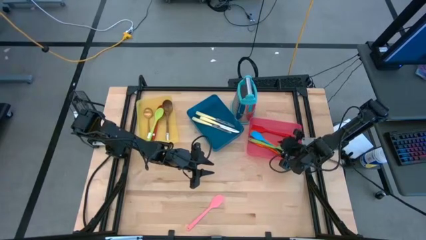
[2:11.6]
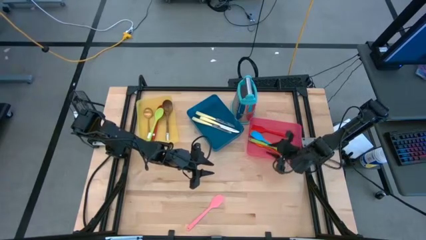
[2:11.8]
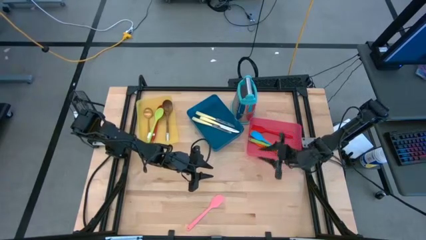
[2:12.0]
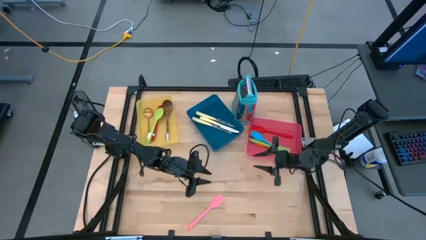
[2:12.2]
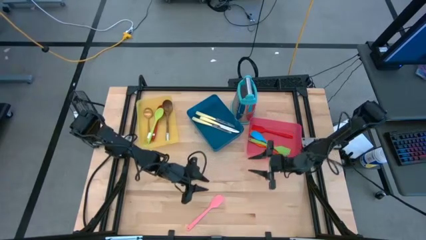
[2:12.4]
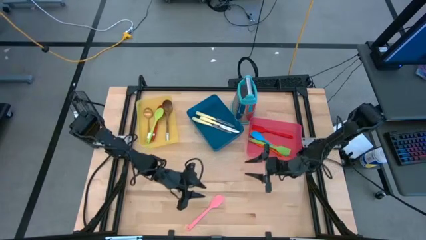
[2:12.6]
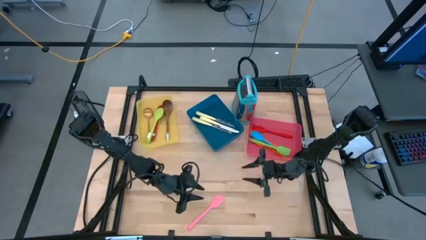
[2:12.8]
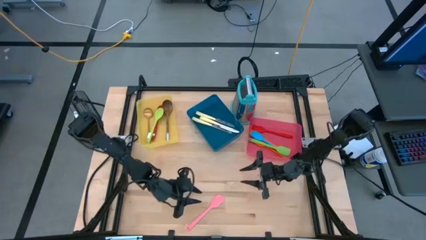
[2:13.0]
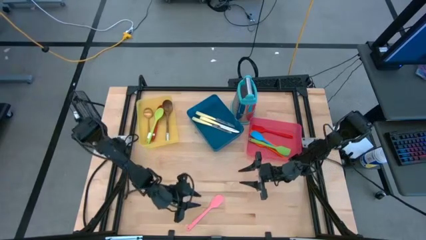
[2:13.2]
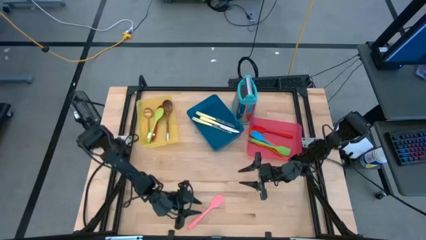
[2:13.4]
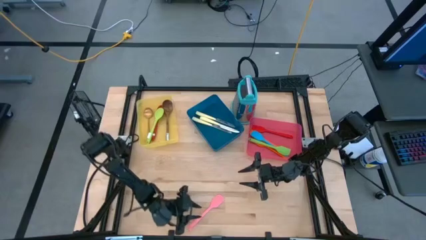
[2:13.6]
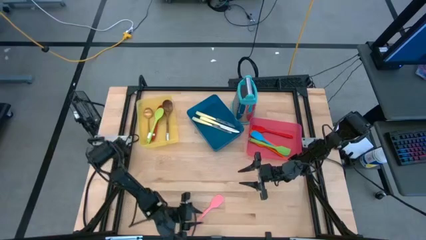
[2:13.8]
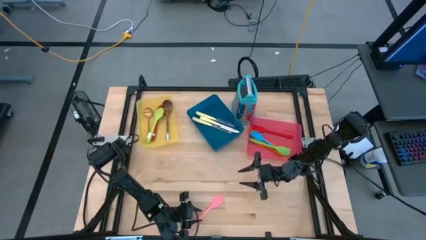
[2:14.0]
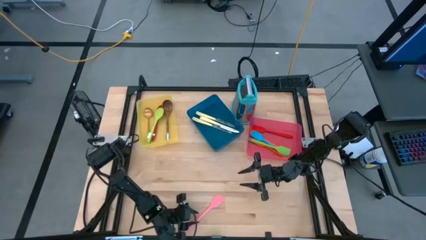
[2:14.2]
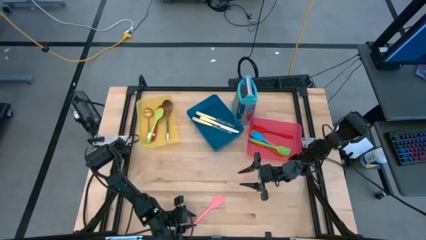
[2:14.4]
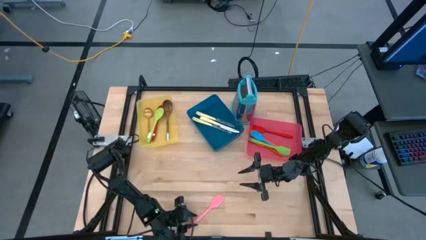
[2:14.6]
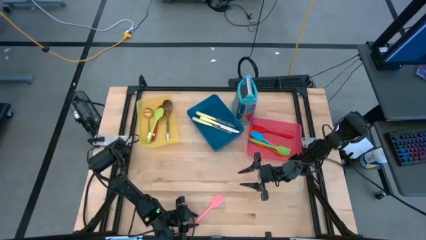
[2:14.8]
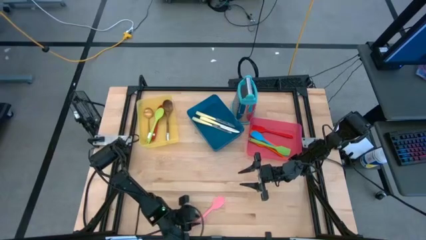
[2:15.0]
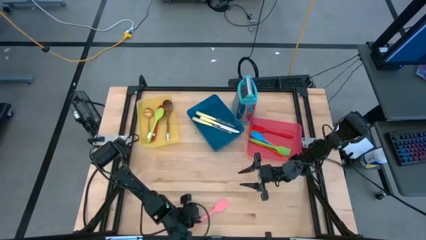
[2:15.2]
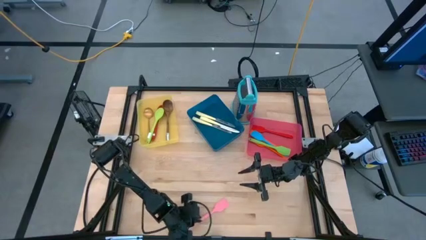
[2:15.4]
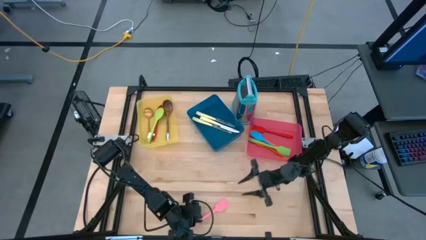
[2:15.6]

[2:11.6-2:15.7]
Task: Pick & Place Kitchen Items
Put the pink spatula into the pink bin

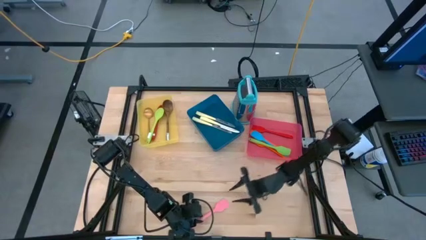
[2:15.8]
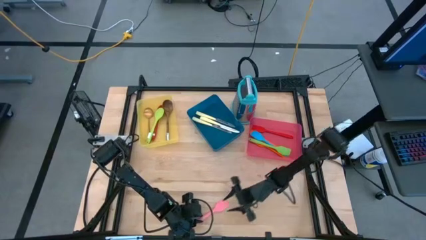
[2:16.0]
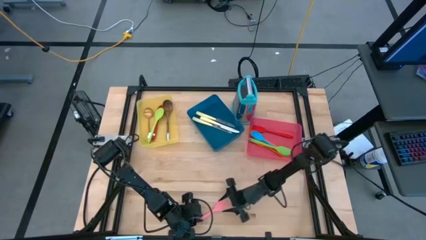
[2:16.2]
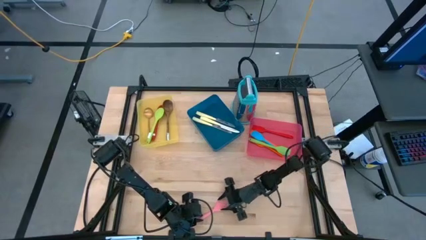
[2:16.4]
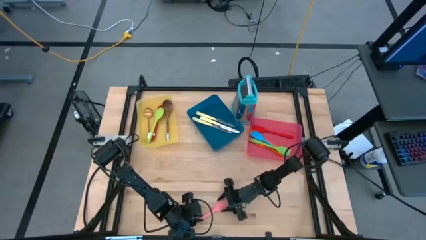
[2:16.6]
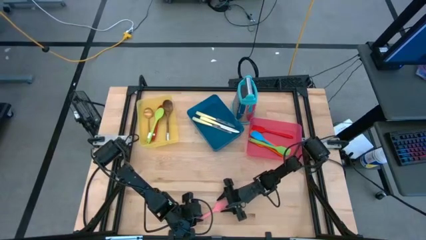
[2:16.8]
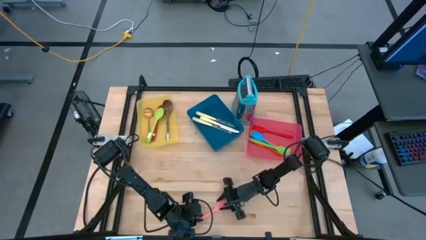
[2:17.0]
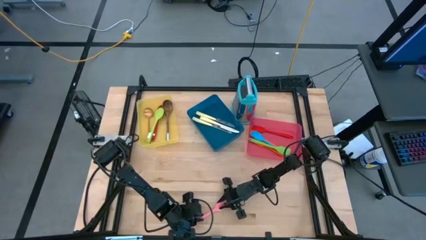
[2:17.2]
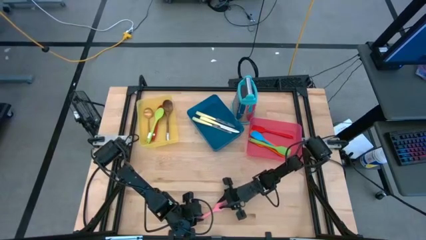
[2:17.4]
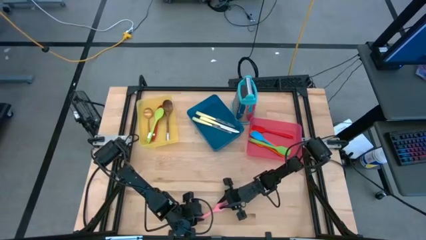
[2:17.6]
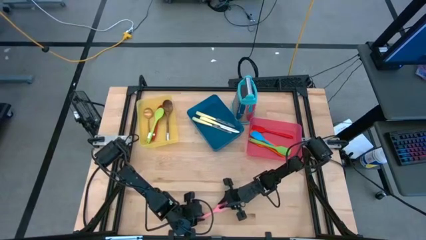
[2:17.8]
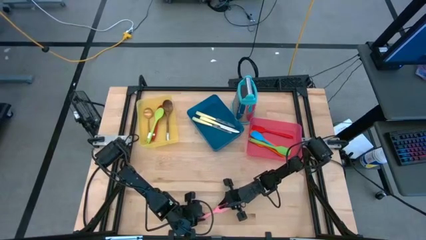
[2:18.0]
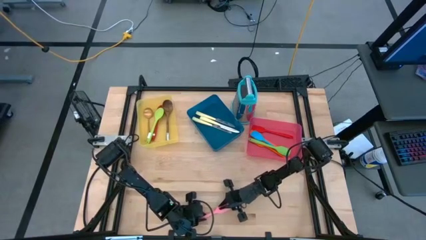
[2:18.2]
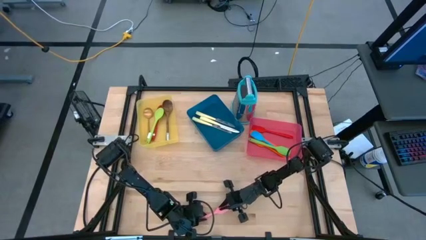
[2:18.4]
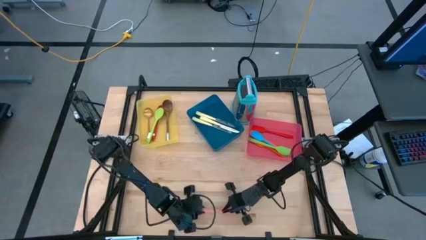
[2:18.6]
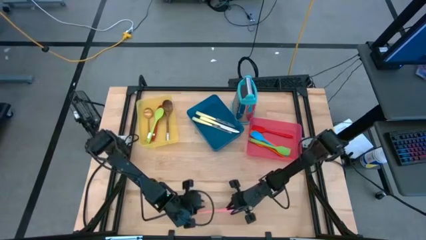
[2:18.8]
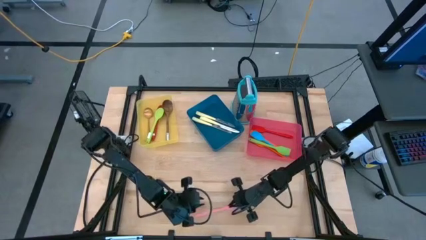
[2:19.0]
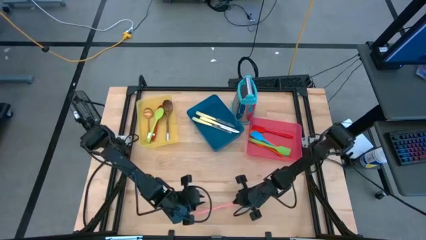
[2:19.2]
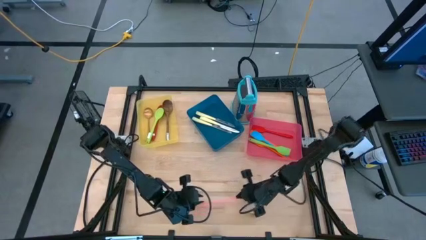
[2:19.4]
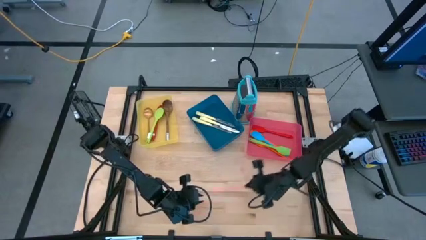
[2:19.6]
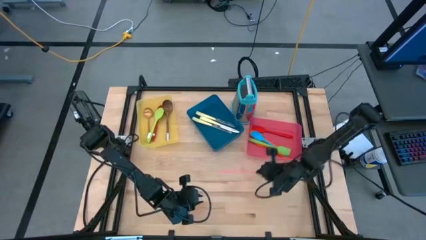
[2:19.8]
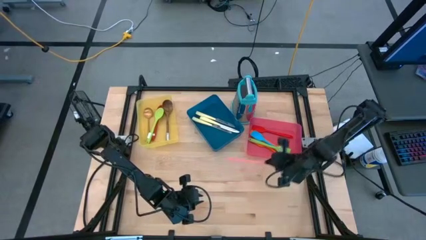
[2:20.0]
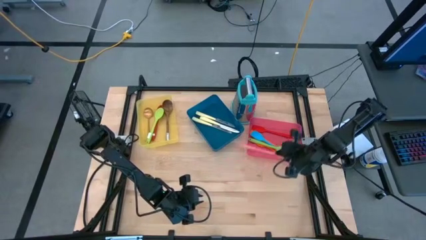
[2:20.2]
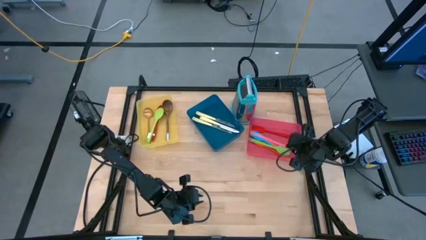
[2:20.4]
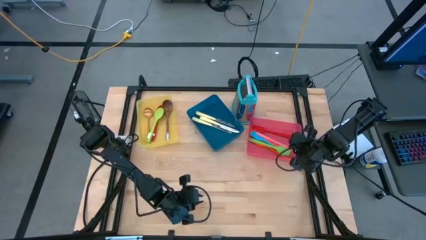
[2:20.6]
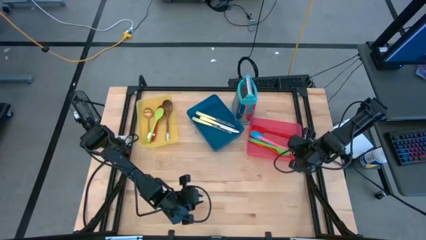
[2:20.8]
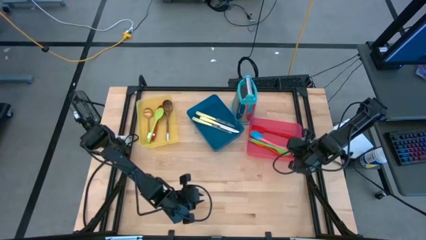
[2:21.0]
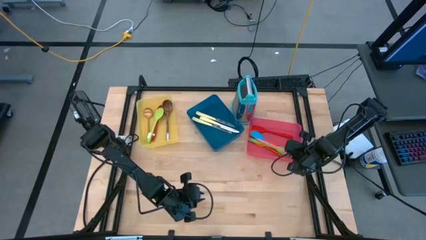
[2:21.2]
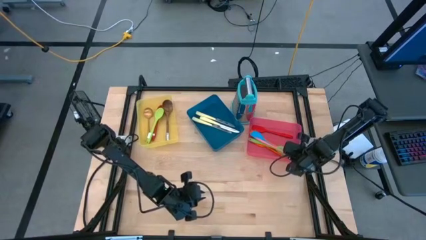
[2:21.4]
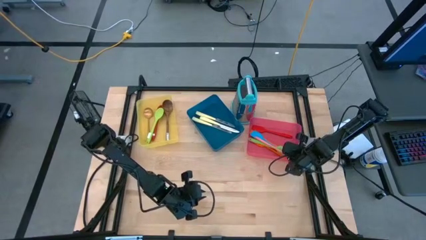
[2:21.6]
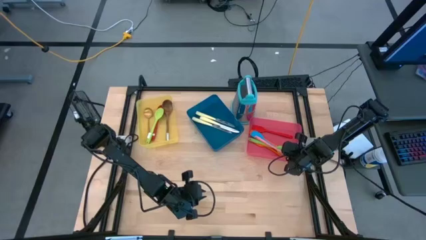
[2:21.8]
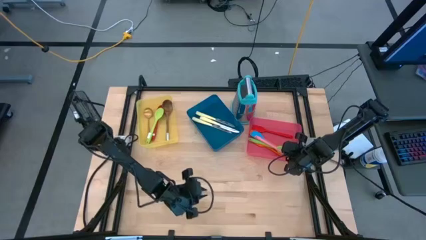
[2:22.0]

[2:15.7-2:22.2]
Put the pink spatula into the pink bin

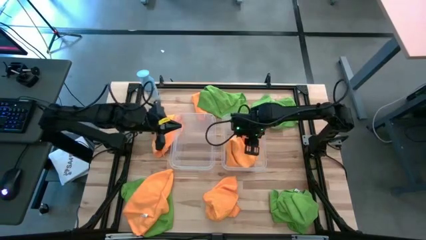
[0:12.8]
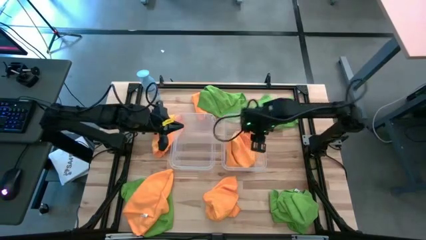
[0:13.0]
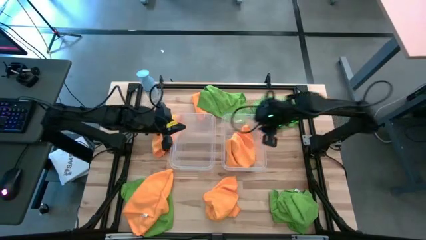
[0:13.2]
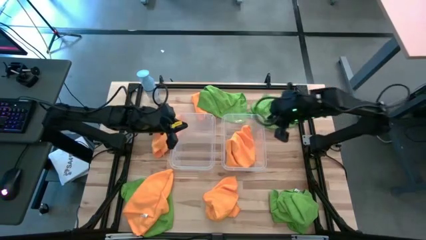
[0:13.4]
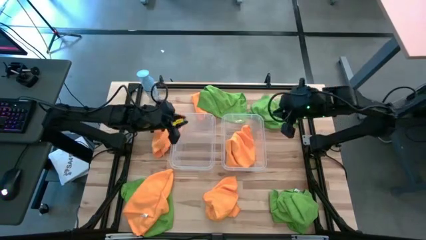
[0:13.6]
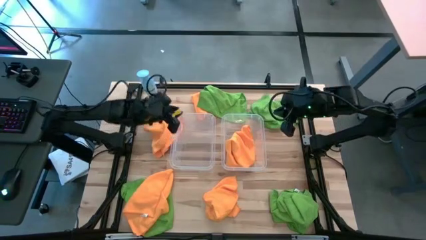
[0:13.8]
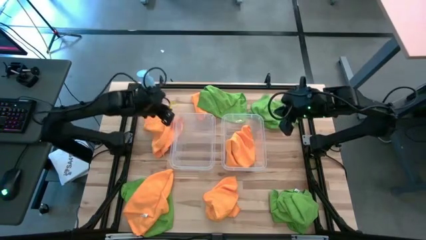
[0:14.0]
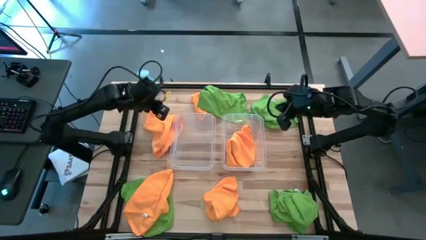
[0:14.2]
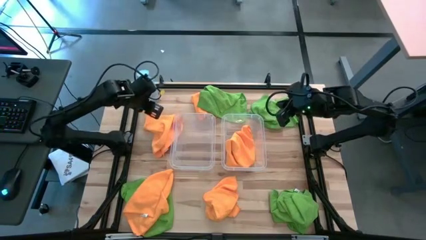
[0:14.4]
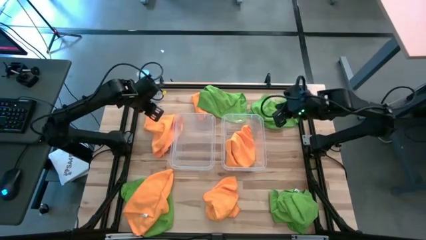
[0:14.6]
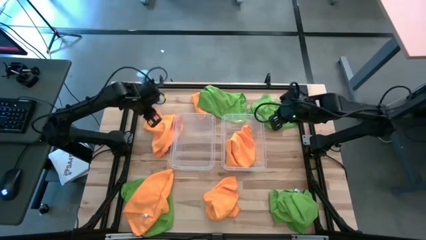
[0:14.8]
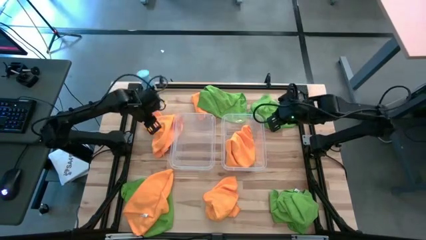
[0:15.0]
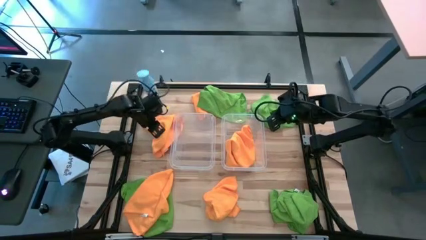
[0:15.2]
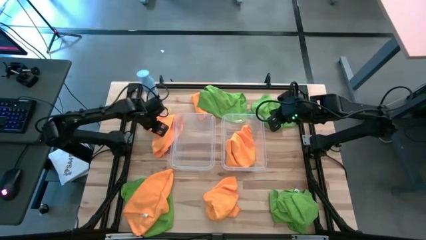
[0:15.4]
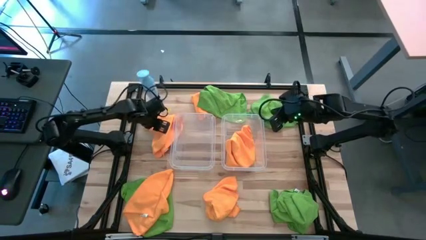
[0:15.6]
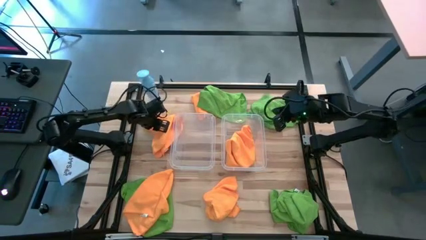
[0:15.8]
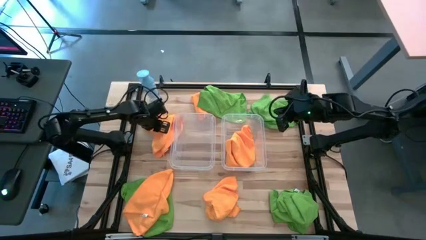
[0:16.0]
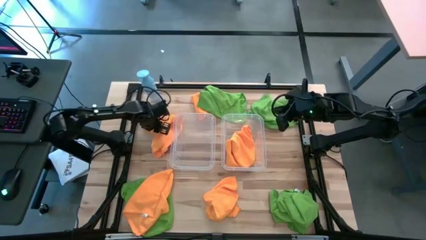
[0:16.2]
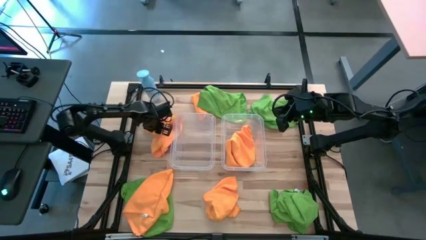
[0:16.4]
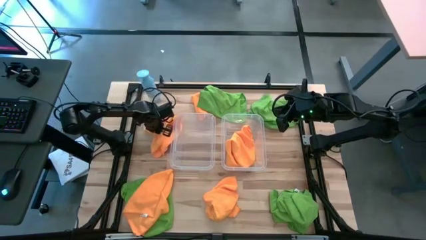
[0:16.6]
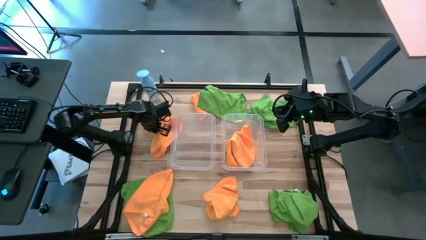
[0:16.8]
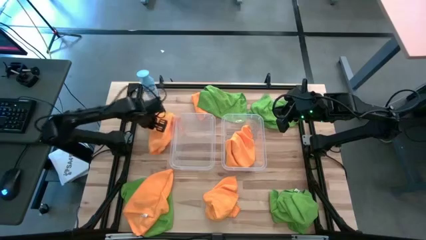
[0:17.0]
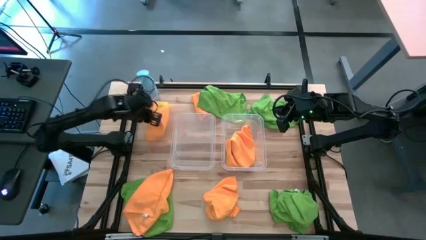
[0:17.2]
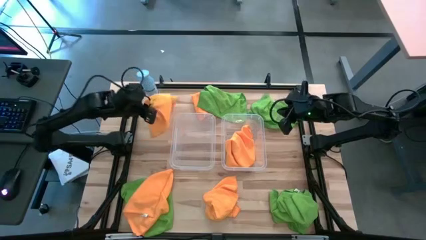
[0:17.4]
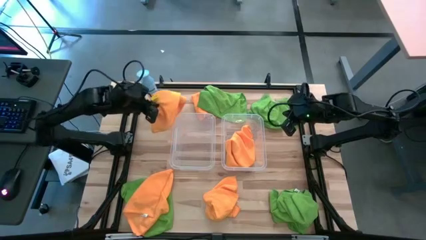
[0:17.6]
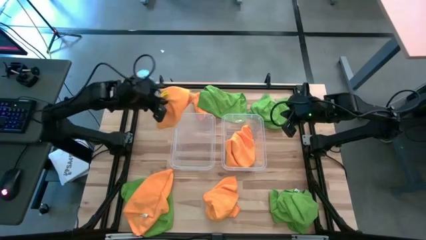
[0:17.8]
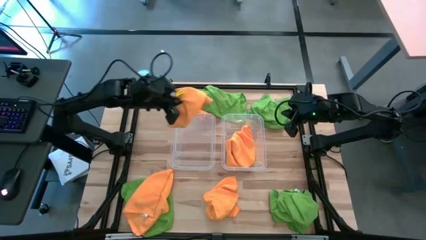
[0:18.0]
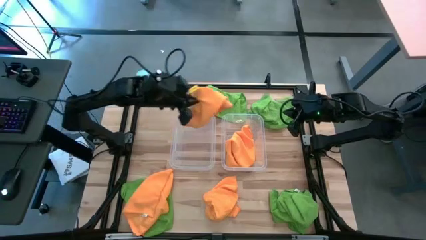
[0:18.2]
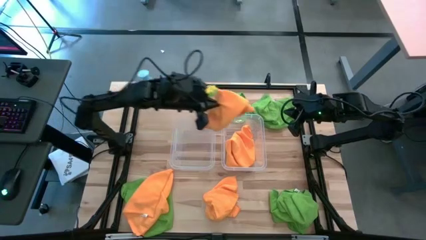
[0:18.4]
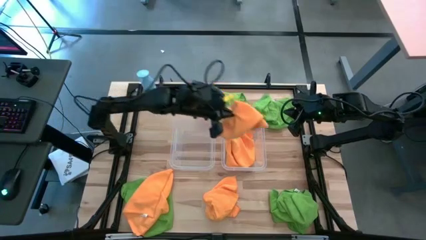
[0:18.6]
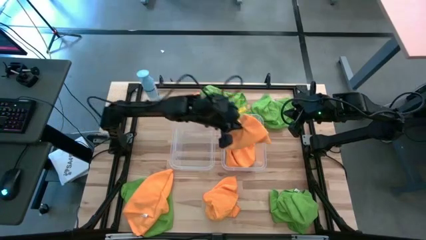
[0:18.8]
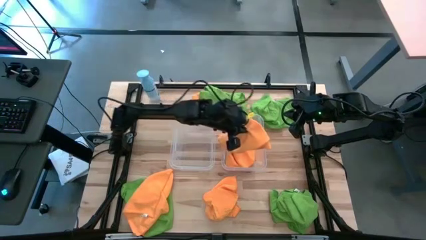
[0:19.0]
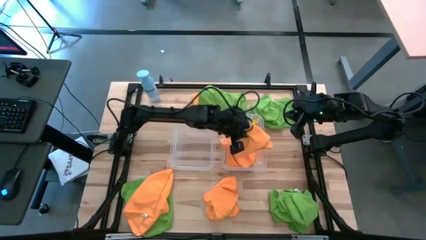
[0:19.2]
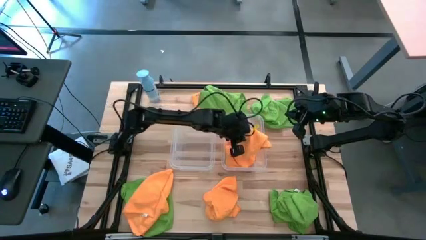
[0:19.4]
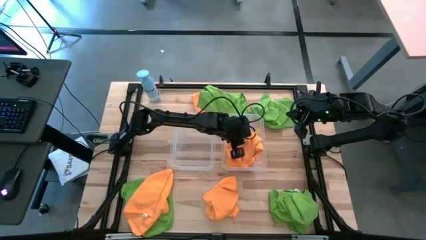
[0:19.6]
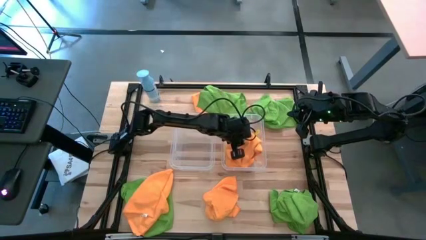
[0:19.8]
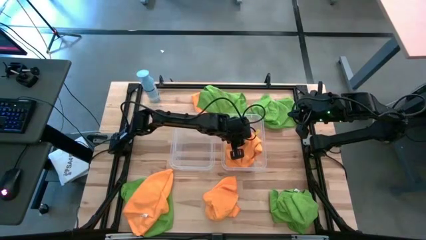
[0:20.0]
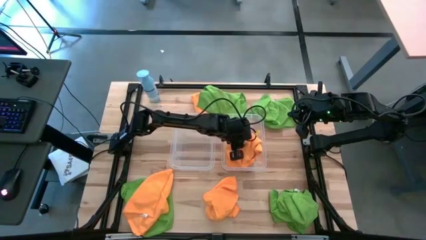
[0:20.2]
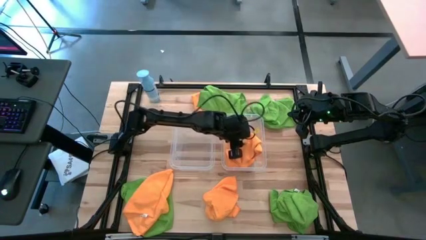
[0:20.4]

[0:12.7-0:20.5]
Task: Sort microfiber towel by color & place in baskets
Put the orange towel into the right transparent bin
